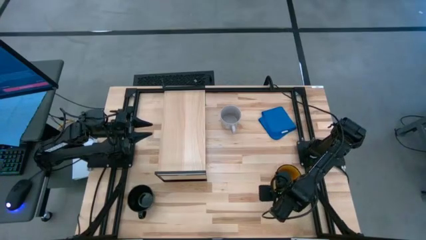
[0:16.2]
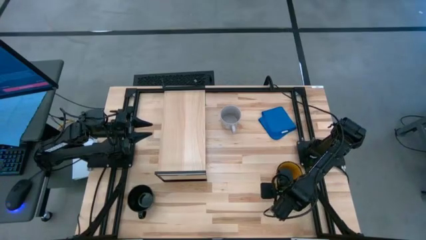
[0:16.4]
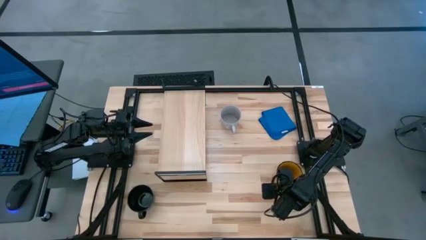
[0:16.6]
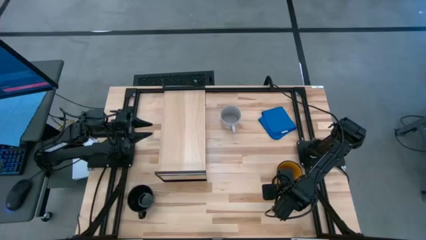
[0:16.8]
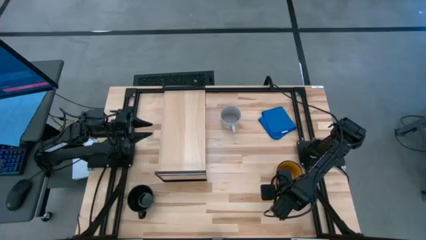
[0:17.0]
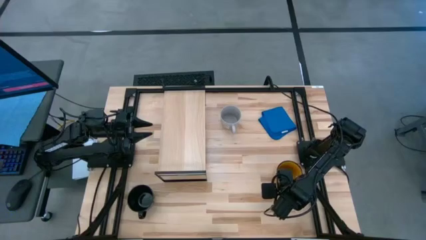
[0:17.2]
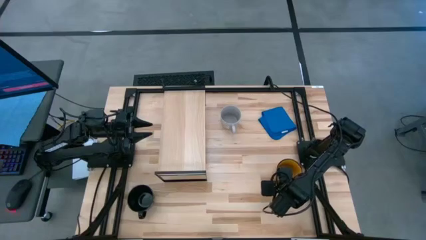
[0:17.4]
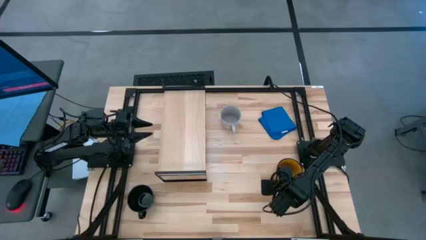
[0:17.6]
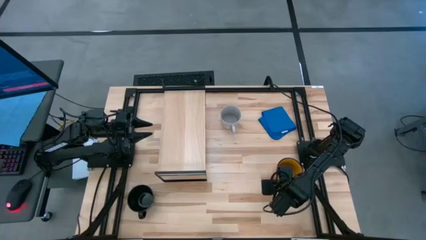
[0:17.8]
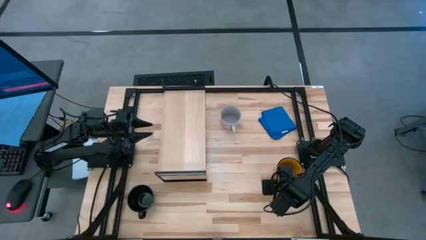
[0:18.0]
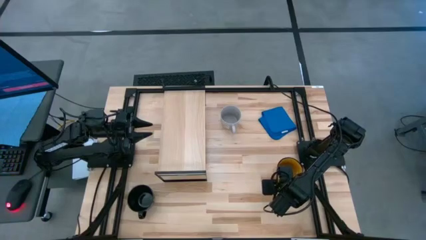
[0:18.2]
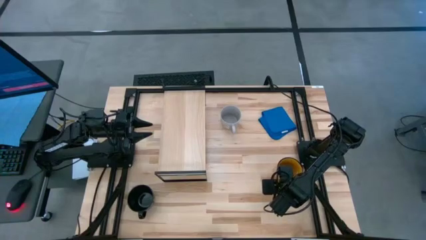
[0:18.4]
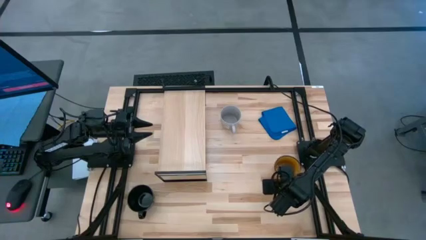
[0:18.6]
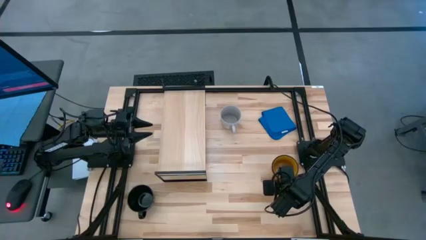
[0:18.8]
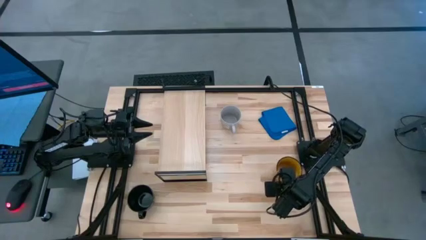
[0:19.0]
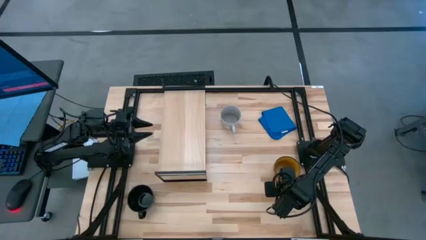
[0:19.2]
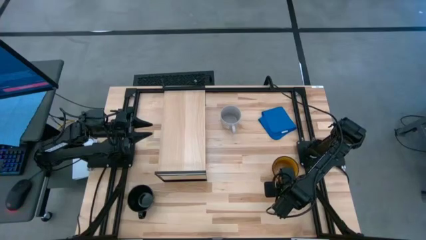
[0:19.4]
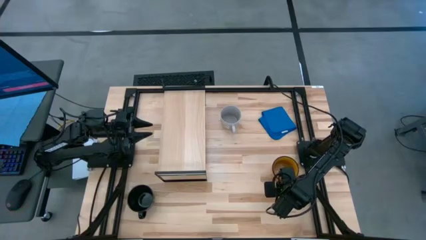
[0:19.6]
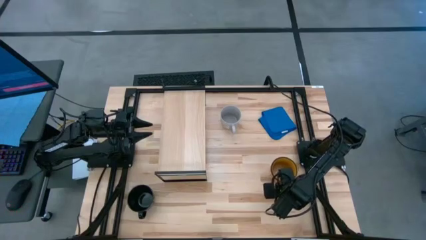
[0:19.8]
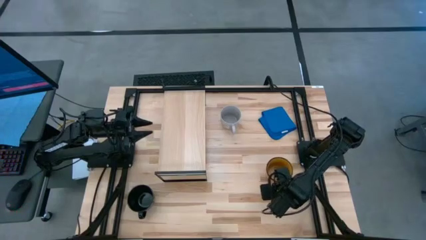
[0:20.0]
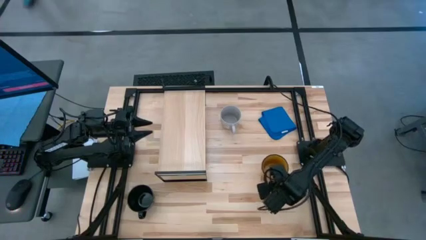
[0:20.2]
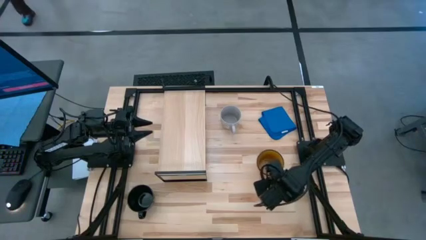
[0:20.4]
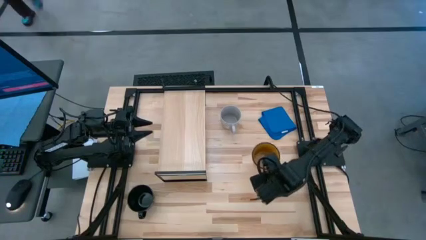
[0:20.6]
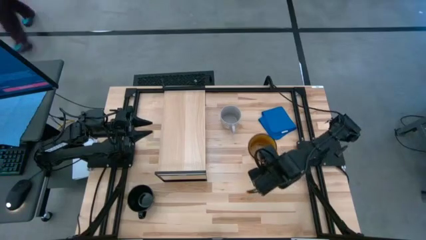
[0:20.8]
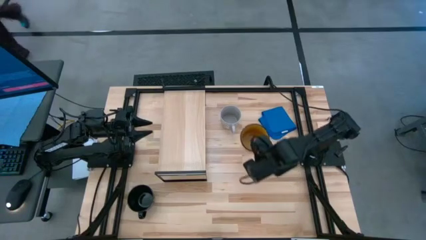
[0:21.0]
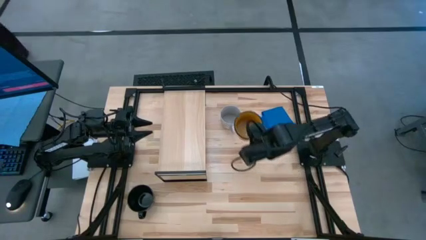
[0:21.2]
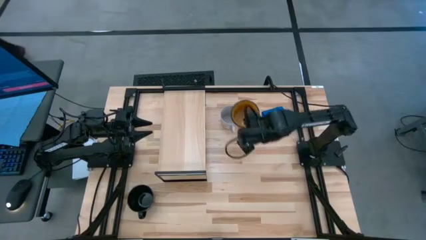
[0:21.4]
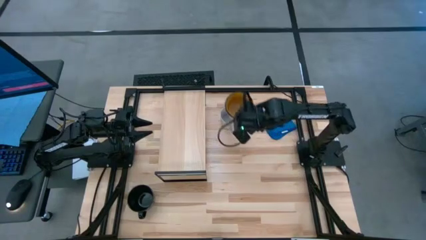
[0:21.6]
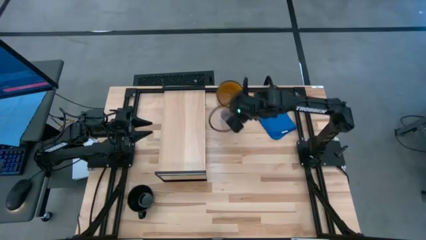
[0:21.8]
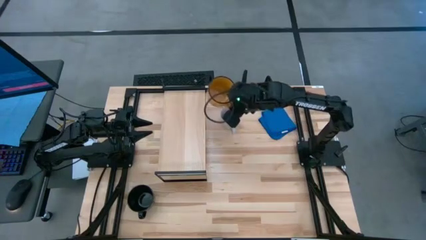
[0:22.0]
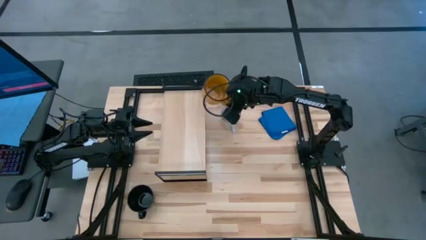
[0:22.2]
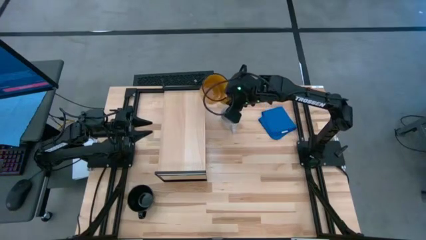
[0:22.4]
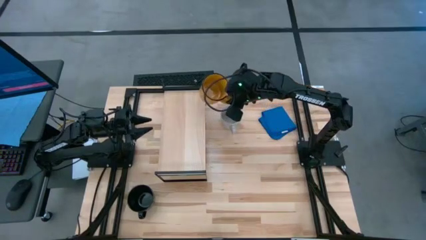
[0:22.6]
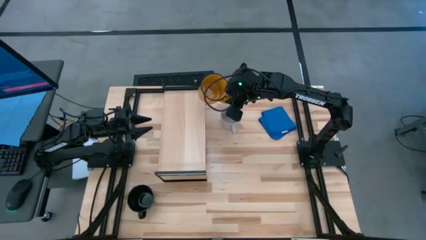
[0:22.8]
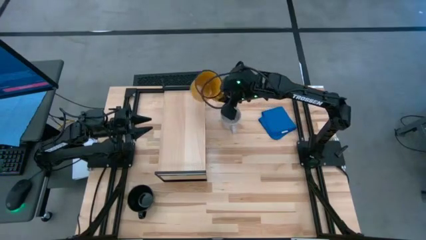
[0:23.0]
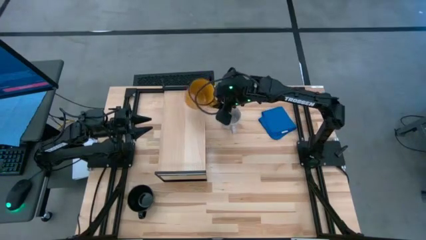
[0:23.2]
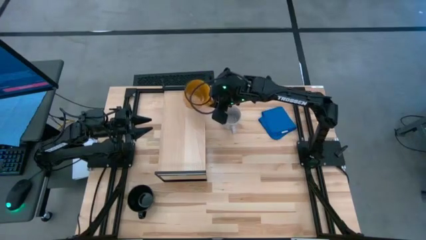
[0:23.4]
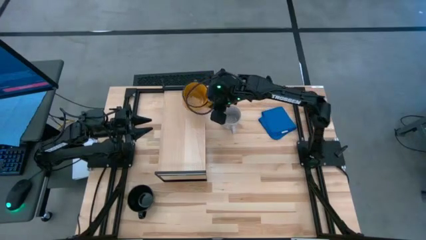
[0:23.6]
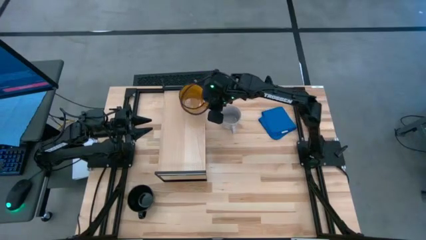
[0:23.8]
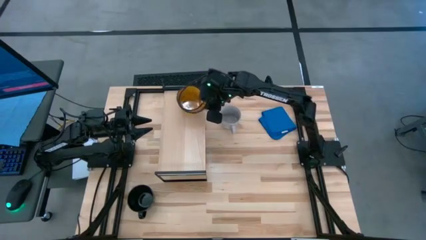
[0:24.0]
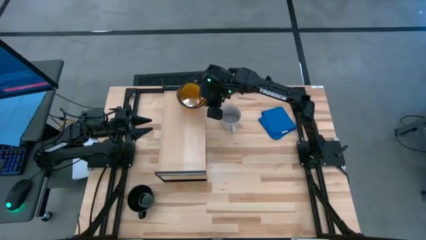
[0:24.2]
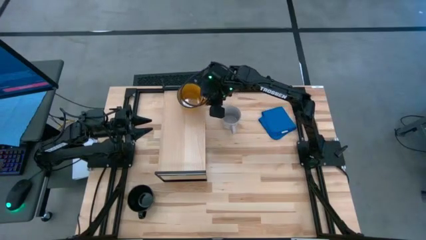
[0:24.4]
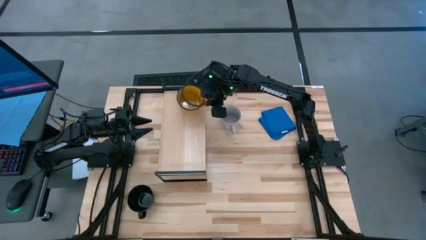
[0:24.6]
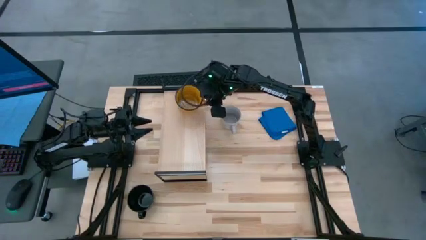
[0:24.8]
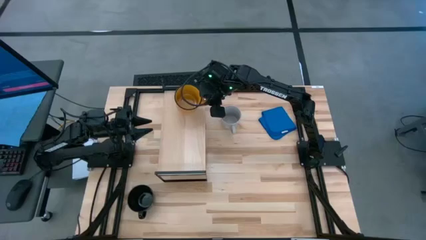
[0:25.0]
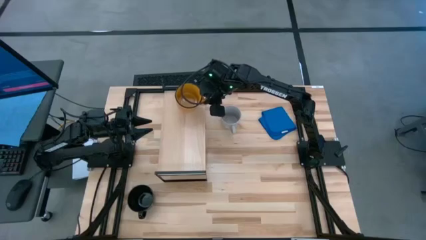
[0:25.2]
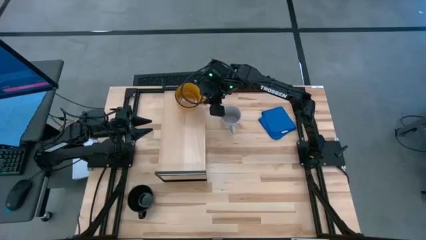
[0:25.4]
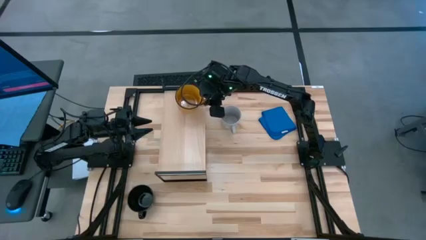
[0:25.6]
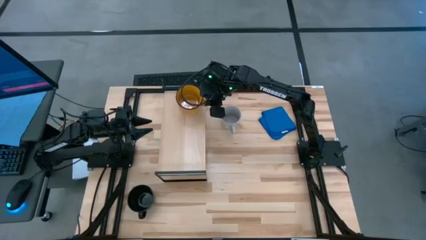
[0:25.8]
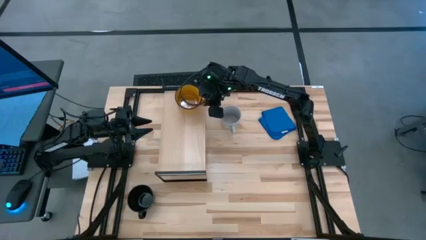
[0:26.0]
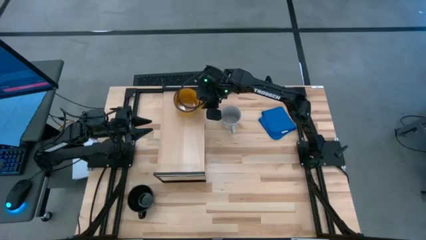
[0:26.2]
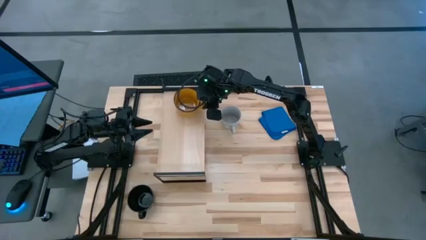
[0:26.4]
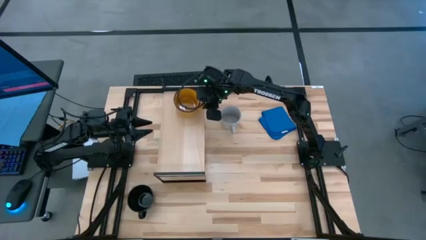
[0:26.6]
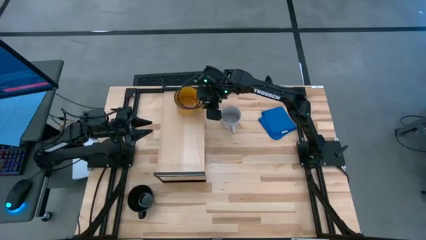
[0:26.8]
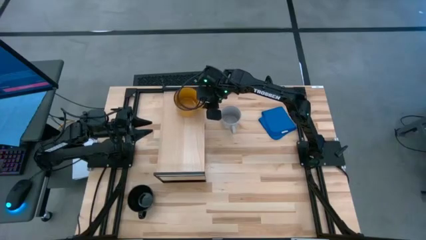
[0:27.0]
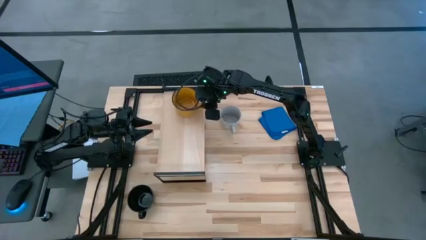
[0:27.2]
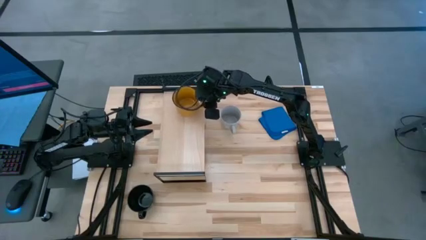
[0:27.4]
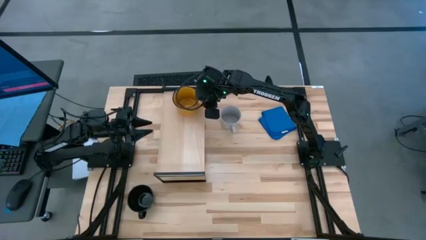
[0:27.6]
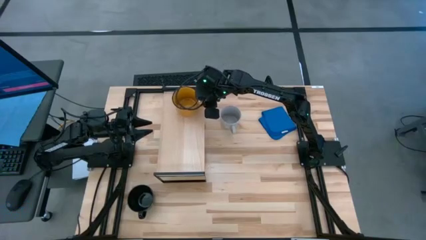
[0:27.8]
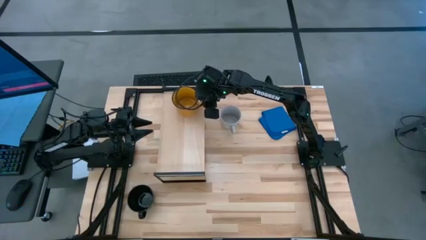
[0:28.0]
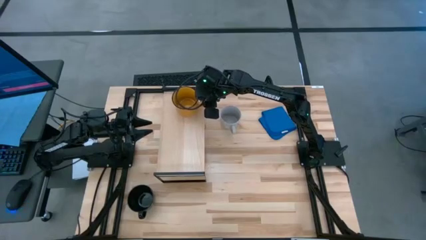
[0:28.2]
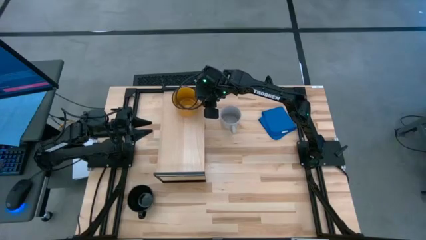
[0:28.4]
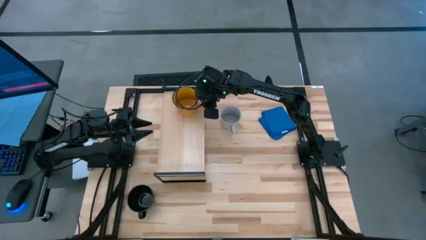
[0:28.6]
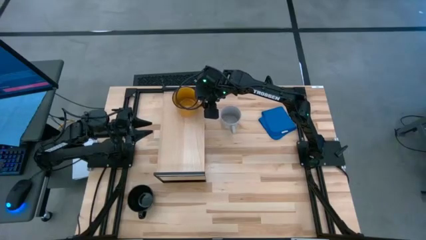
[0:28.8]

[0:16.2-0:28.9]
Task: Stack small to large cups/mugs on shelf
Put the yellow mug on the shelf
